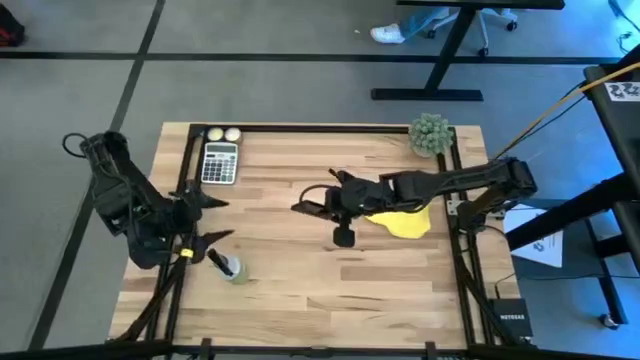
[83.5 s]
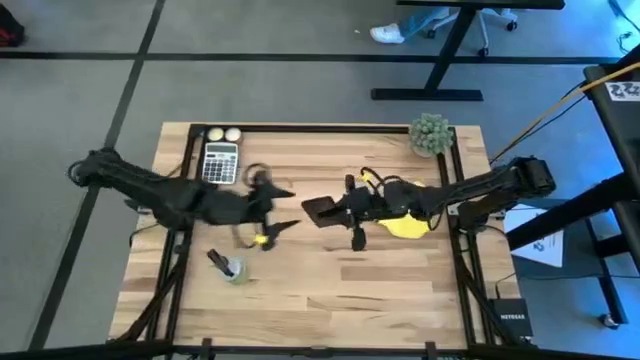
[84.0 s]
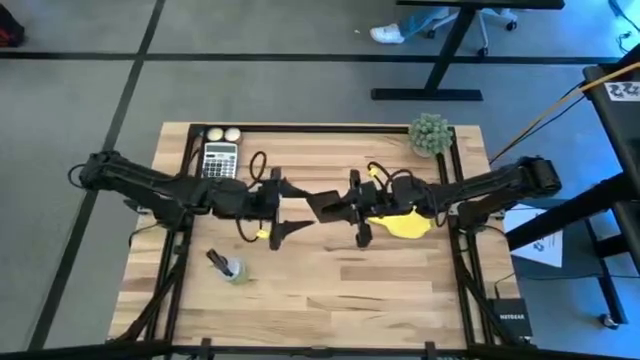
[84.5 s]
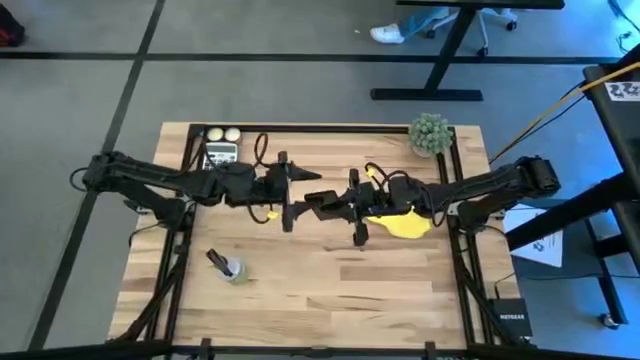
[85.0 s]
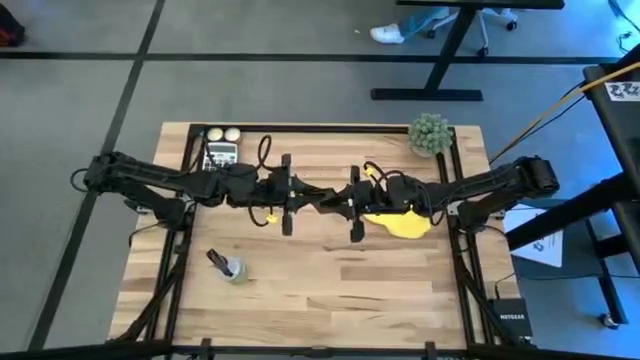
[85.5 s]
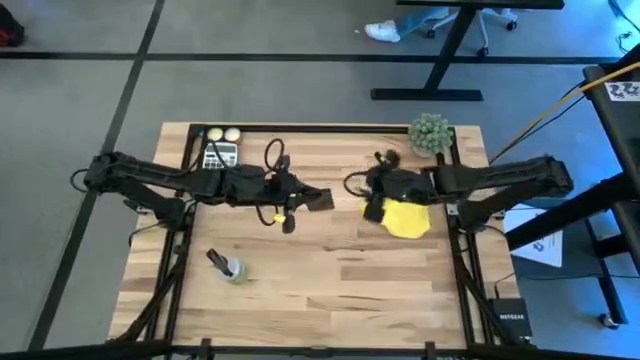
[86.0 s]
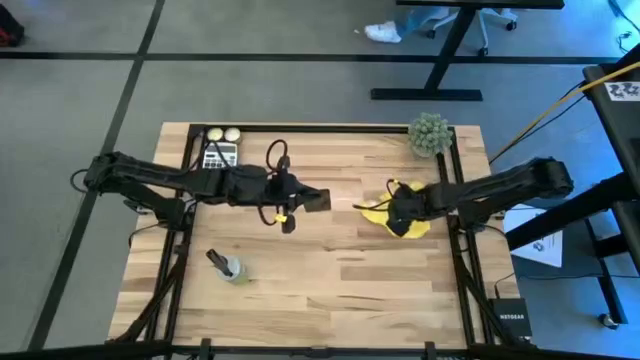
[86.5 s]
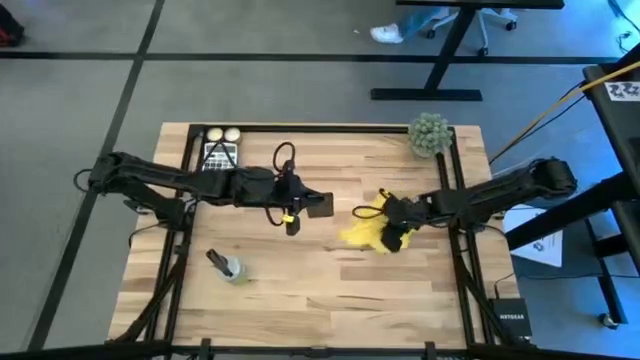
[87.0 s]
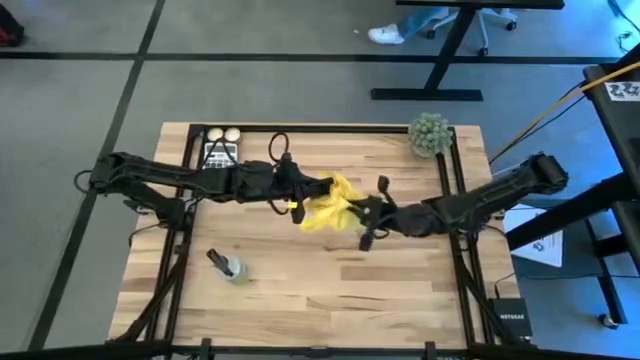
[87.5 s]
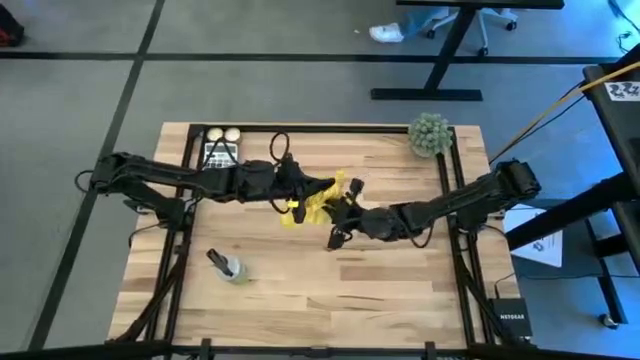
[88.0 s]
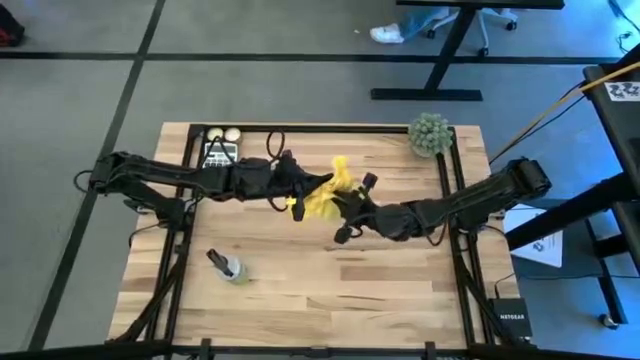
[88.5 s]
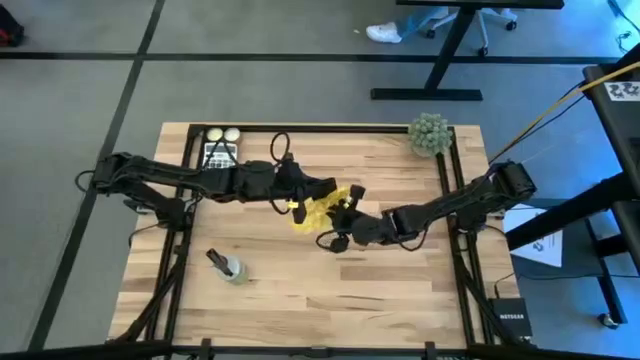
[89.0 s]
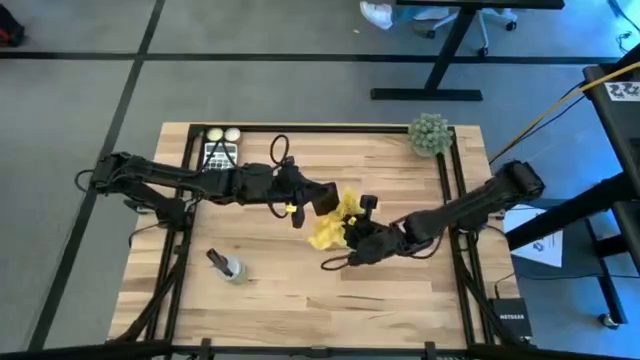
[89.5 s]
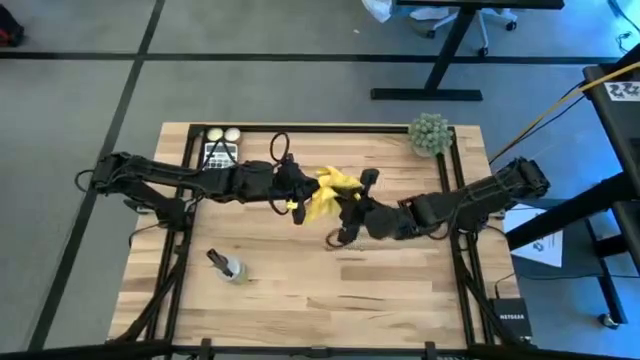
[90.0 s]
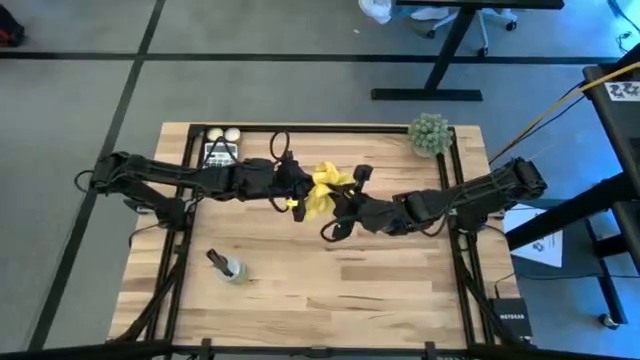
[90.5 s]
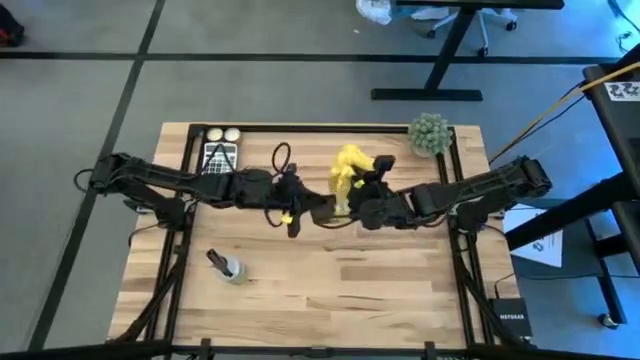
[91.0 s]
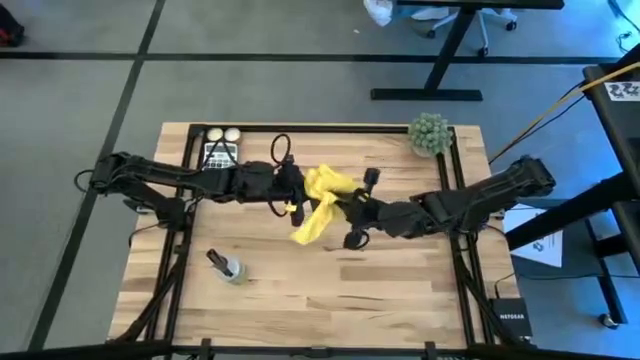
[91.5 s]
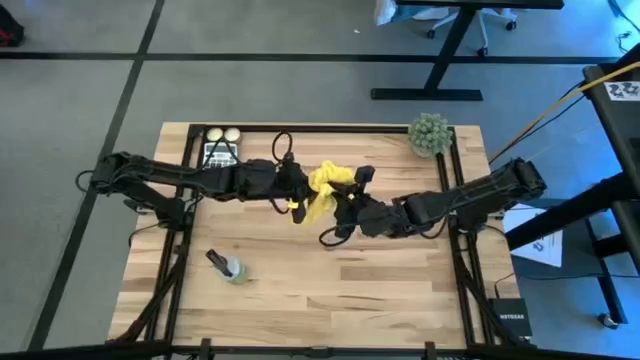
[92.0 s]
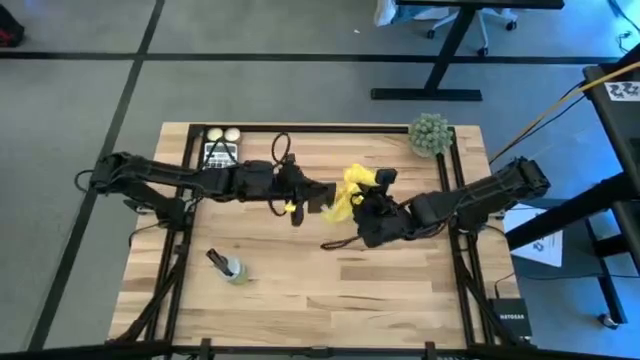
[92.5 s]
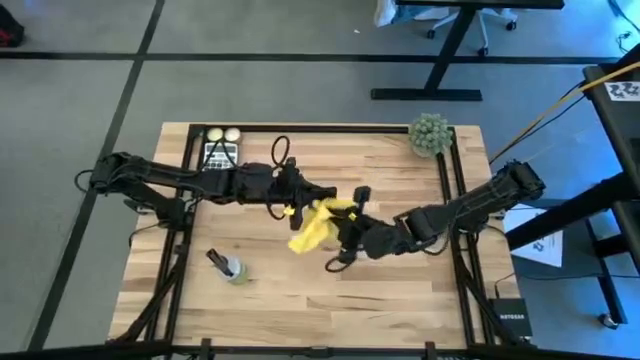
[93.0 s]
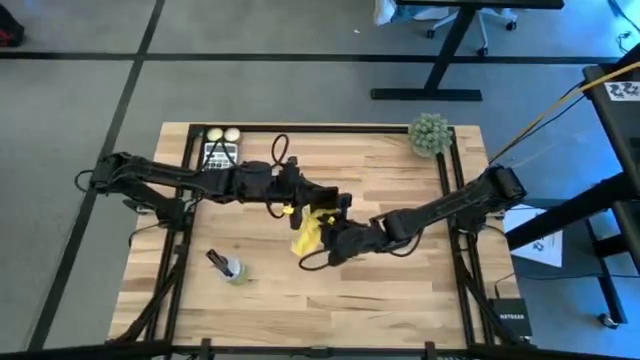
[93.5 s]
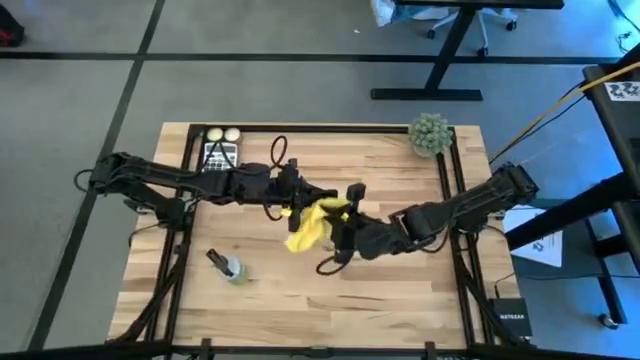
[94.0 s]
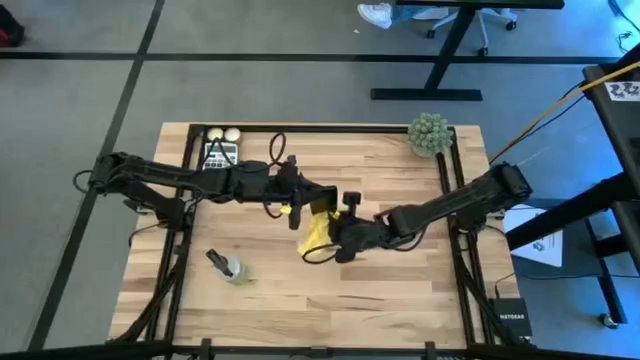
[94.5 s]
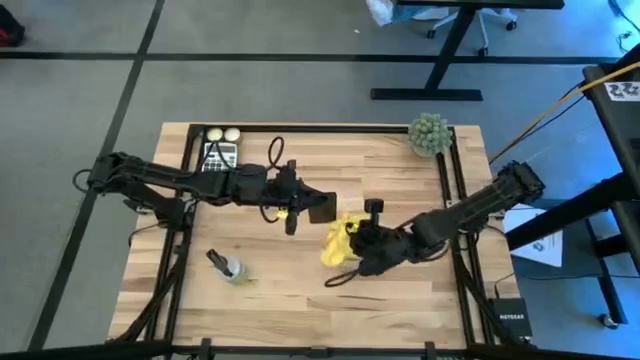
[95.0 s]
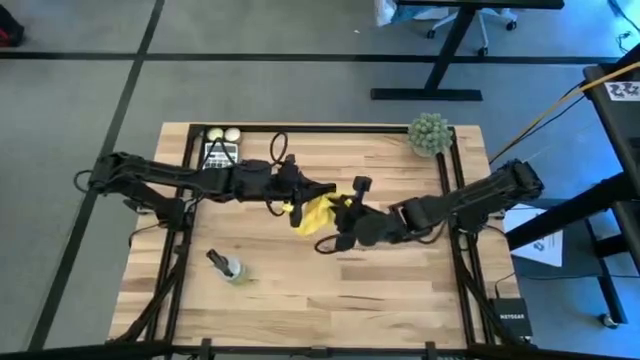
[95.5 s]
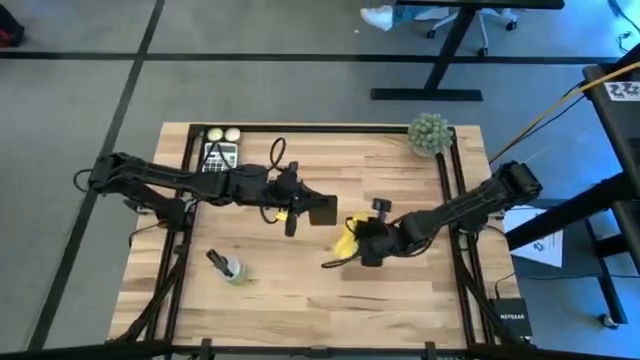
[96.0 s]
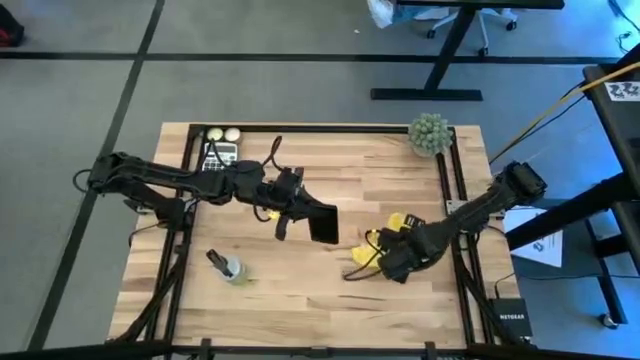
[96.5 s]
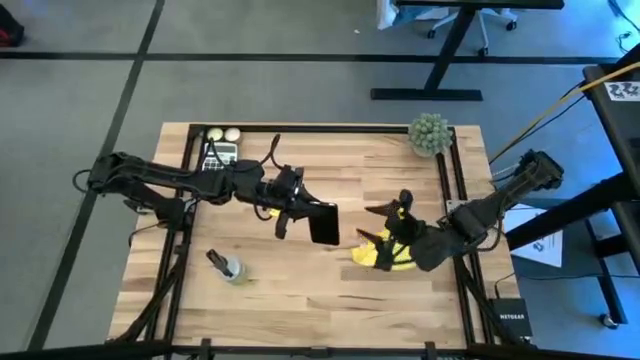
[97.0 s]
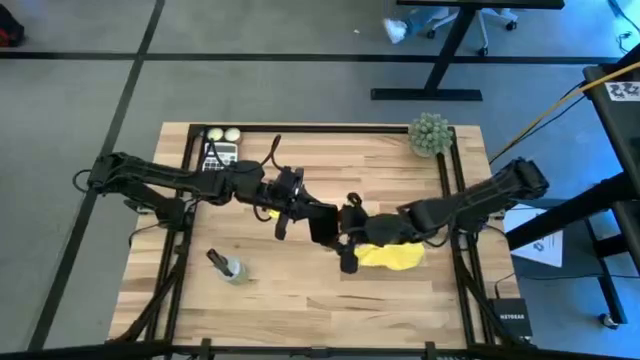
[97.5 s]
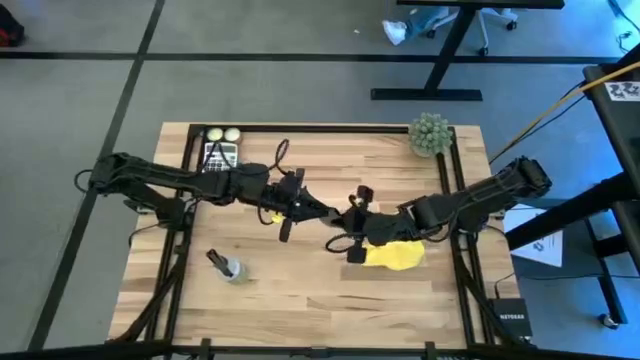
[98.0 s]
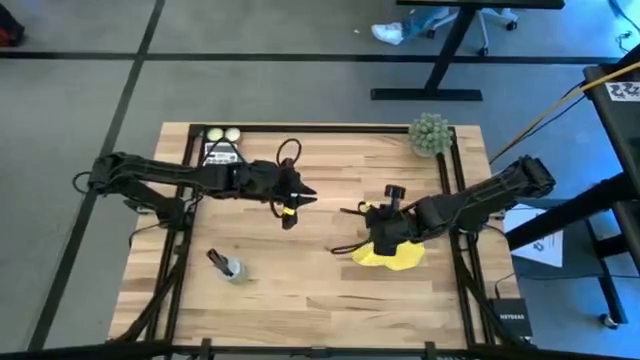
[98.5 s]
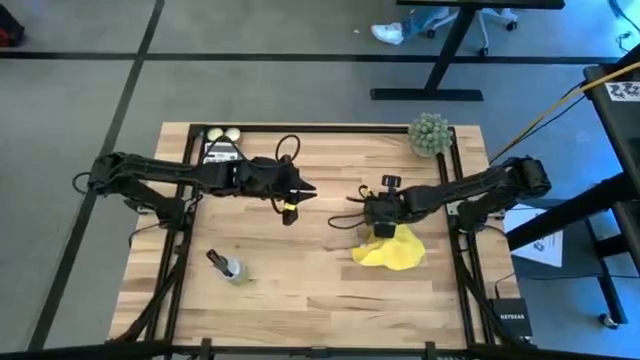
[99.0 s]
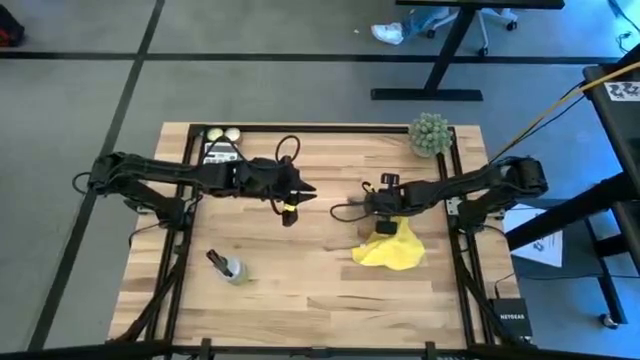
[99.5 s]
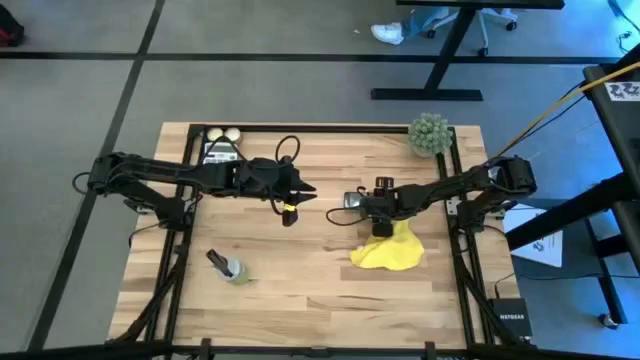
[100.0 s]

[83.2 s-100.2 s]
Task: Apply microfiber cloth
Wipe the back of the cellphone with a microfiber cloth

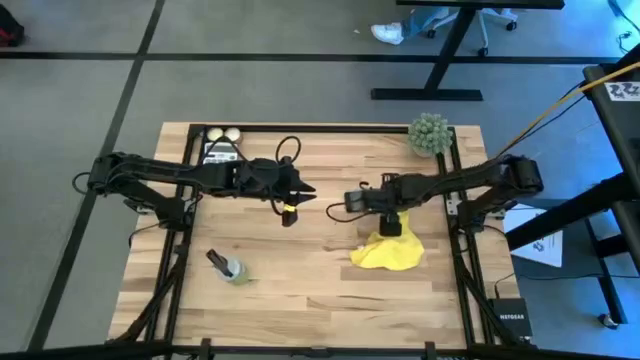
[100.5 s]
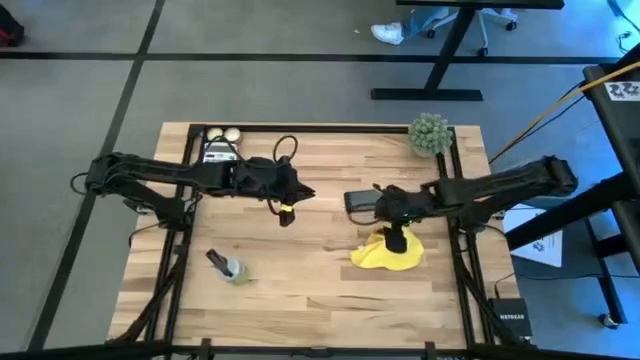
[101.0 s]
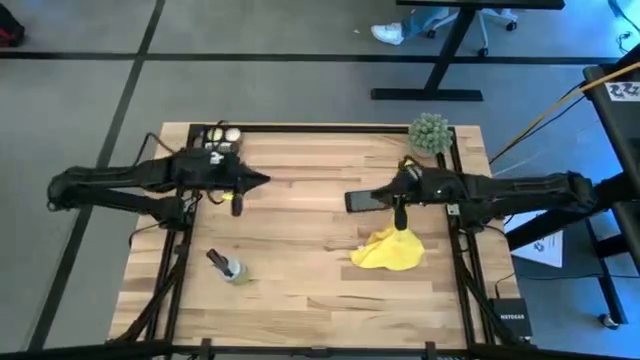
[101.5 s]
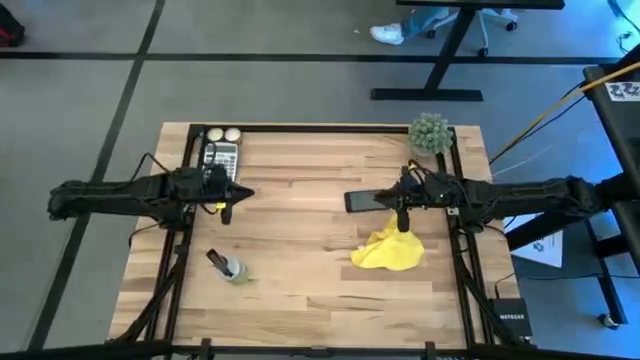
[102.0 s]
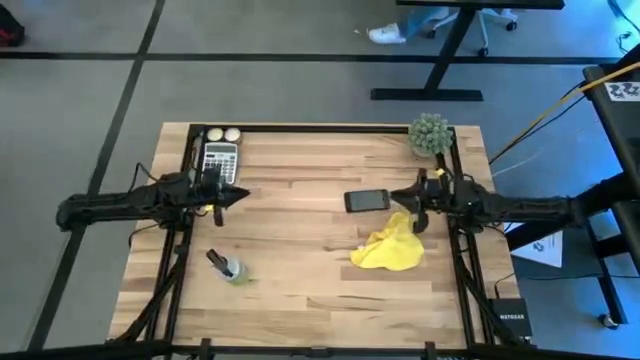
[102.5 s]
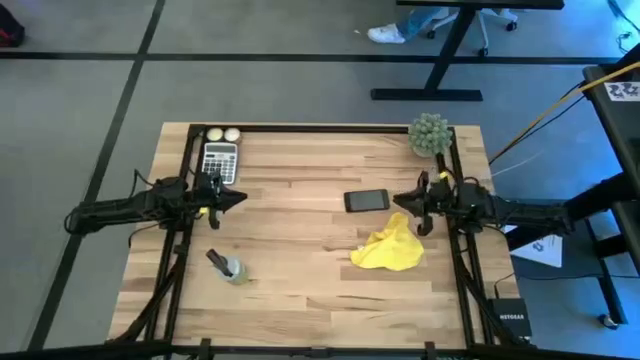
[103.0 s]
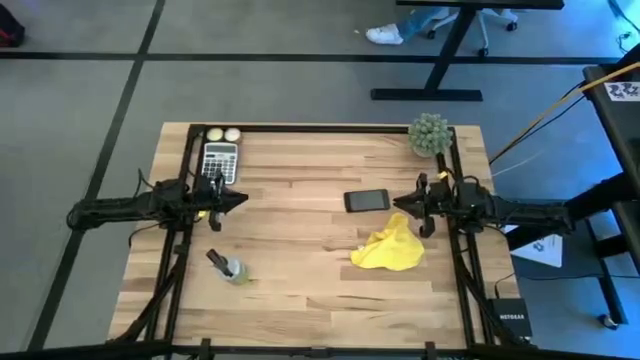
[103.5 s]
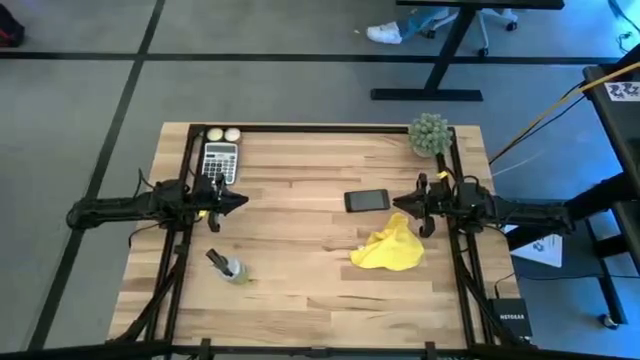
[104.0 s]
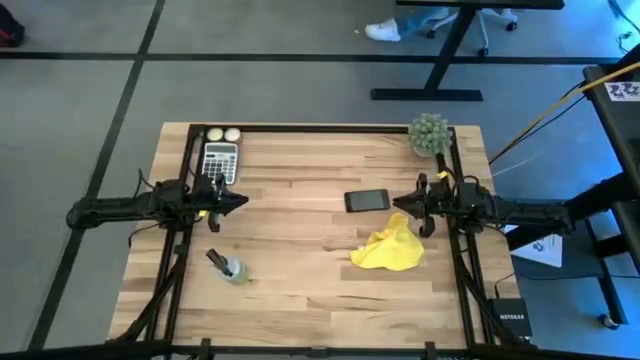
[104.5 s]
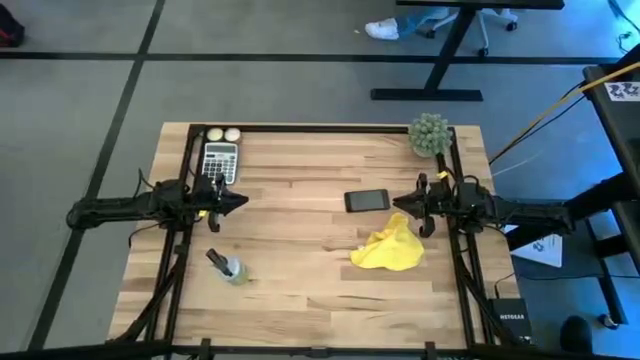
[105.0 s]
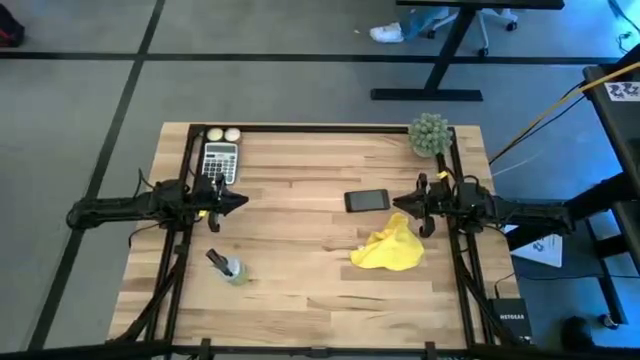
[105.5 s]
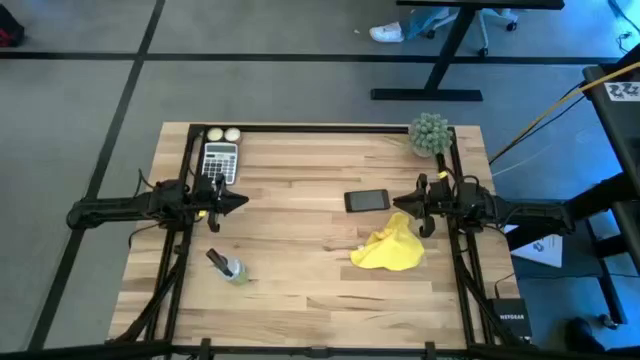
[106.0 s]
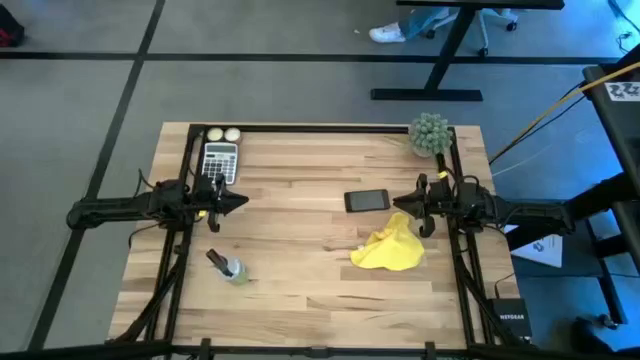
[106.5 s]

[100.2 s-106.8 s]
Return to Home Position
